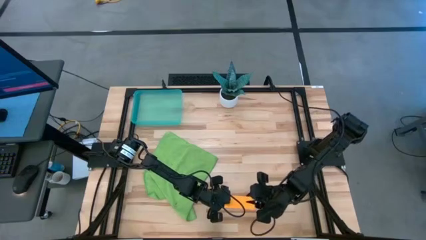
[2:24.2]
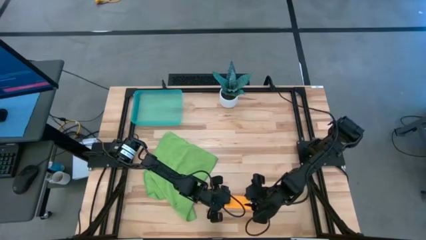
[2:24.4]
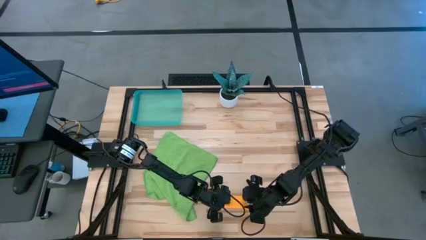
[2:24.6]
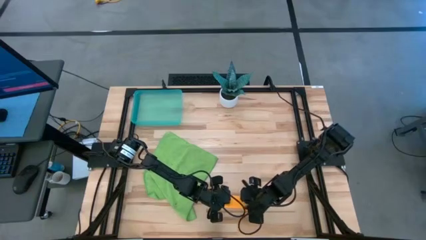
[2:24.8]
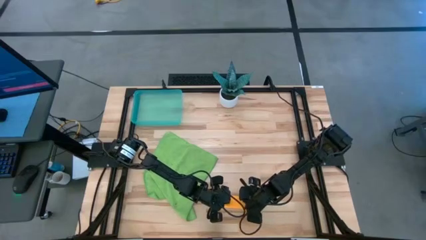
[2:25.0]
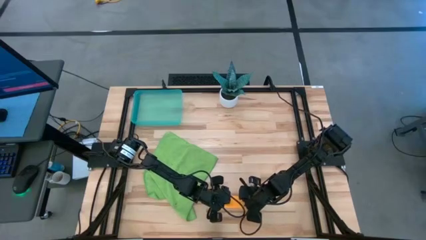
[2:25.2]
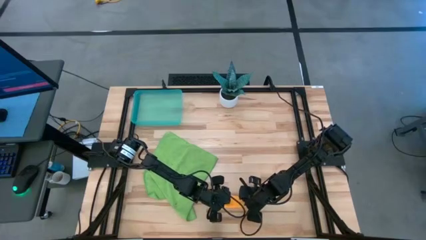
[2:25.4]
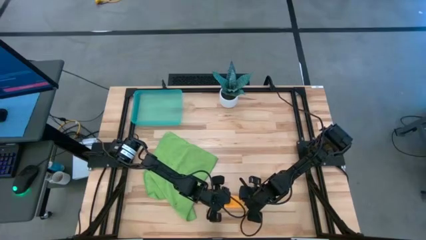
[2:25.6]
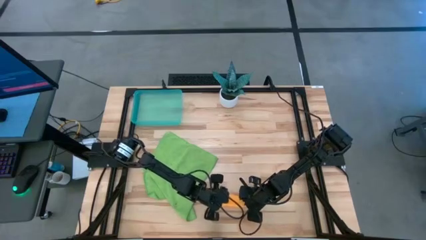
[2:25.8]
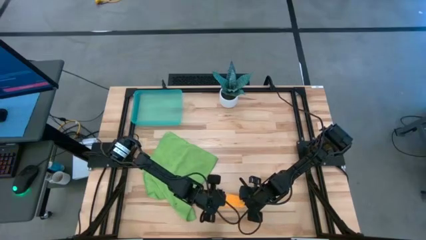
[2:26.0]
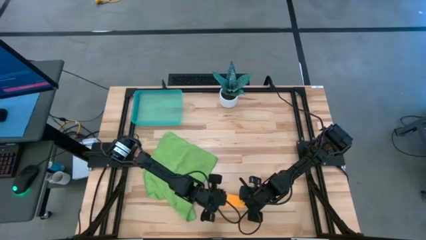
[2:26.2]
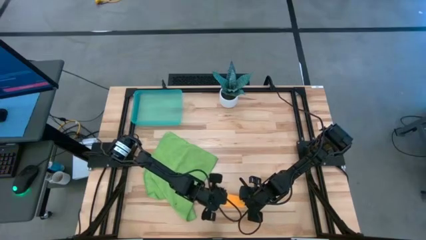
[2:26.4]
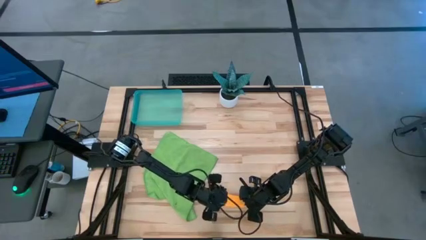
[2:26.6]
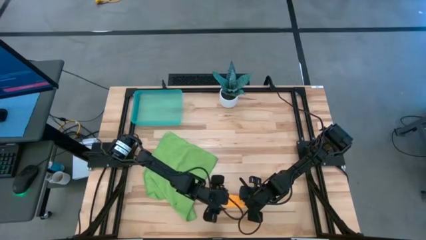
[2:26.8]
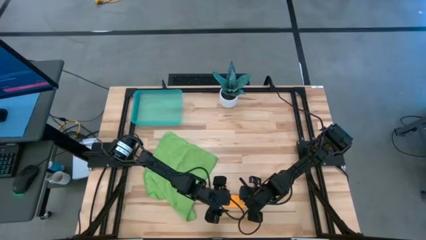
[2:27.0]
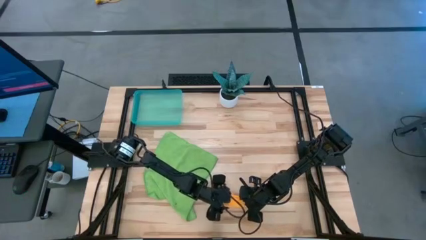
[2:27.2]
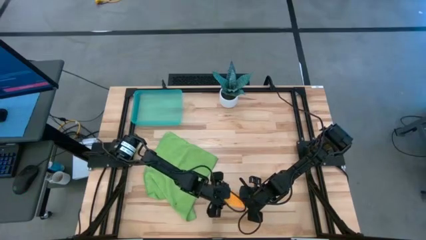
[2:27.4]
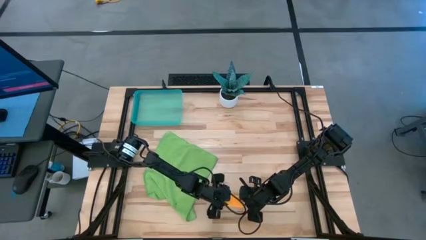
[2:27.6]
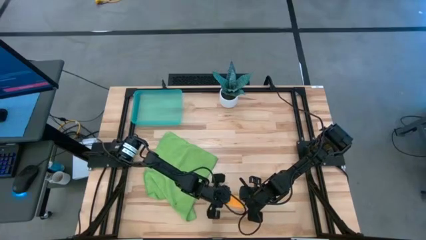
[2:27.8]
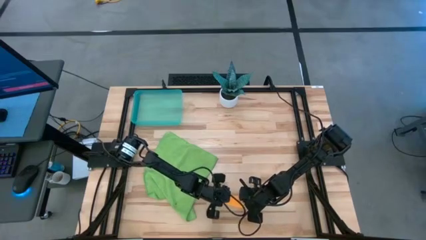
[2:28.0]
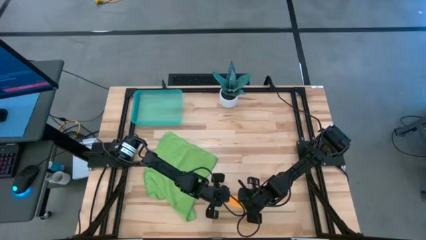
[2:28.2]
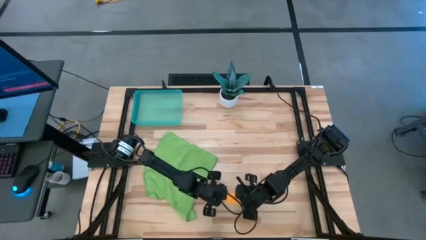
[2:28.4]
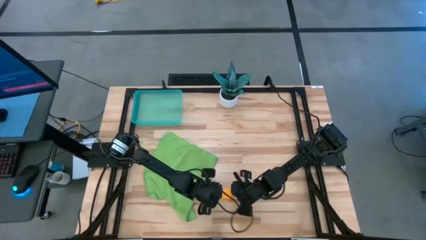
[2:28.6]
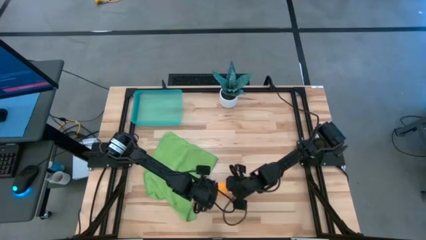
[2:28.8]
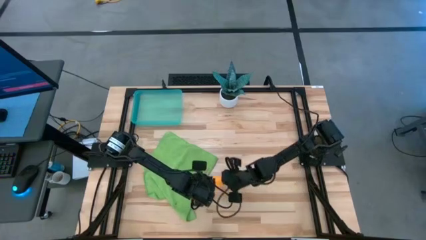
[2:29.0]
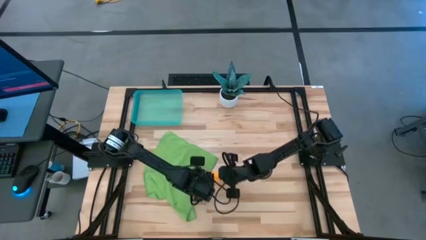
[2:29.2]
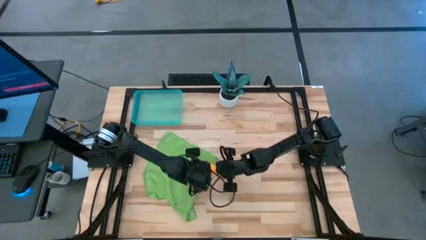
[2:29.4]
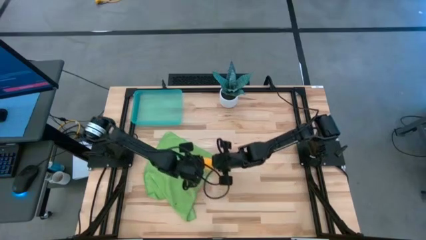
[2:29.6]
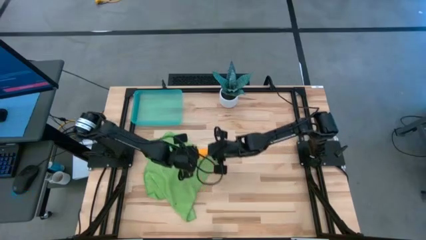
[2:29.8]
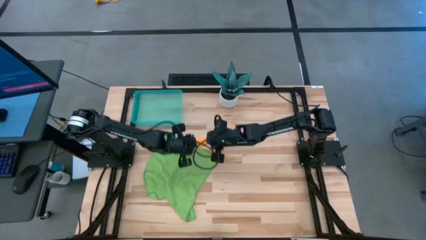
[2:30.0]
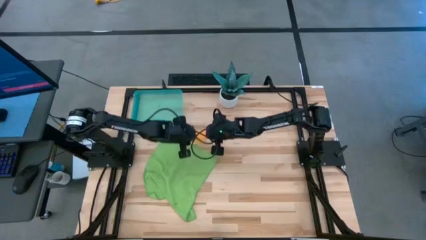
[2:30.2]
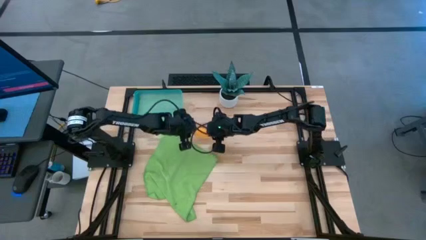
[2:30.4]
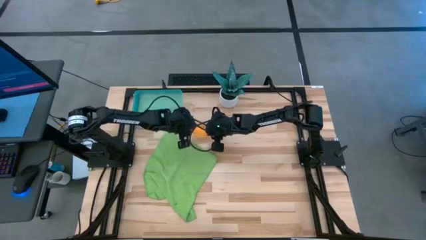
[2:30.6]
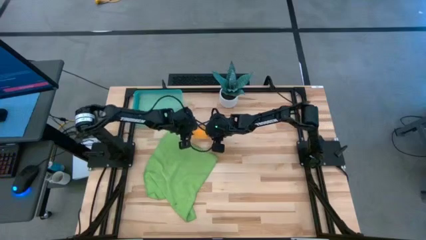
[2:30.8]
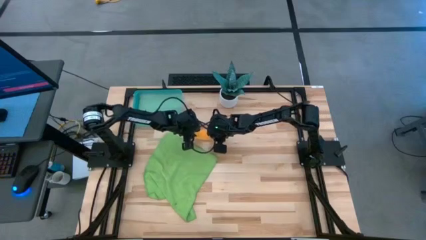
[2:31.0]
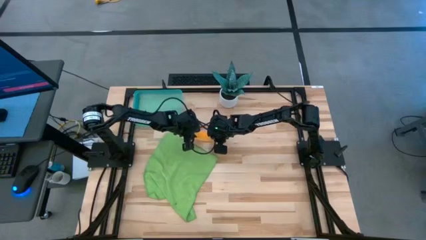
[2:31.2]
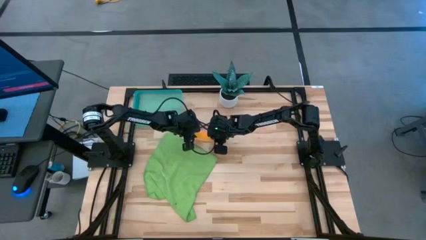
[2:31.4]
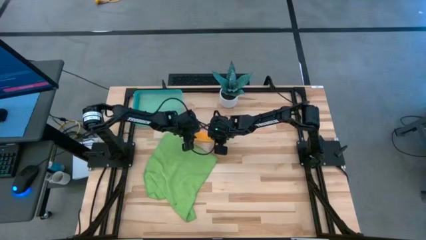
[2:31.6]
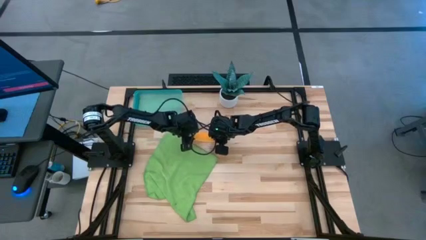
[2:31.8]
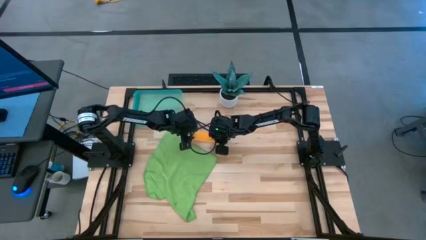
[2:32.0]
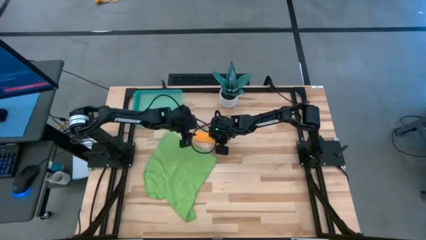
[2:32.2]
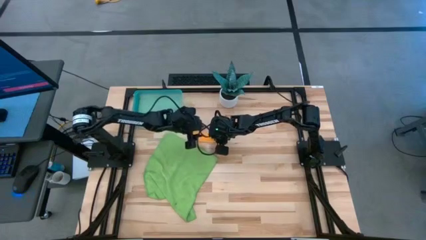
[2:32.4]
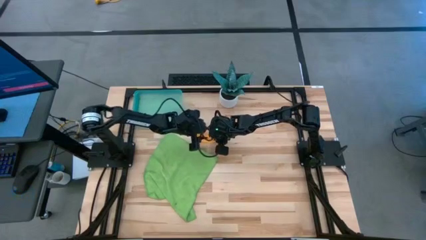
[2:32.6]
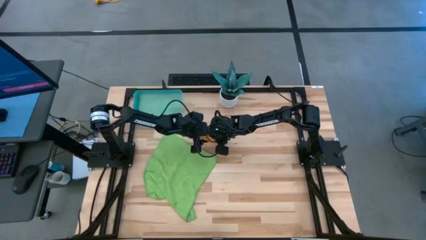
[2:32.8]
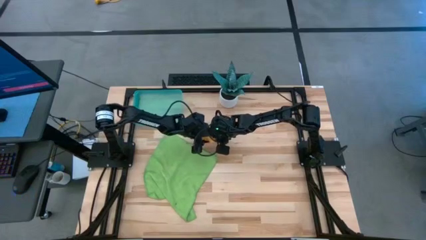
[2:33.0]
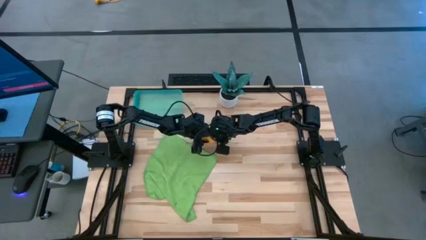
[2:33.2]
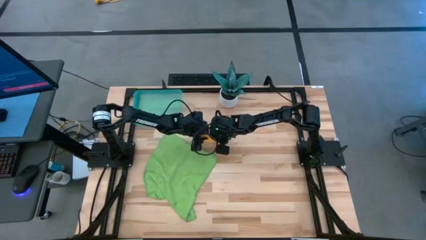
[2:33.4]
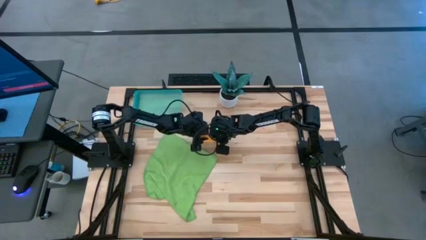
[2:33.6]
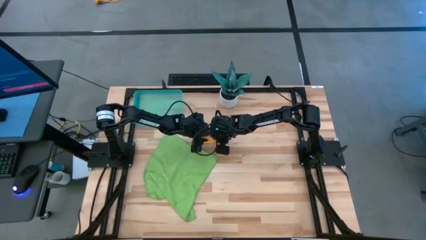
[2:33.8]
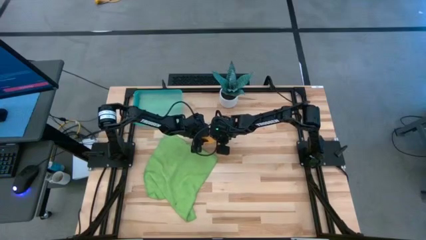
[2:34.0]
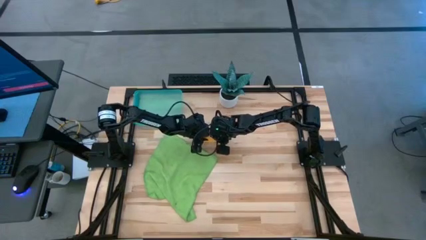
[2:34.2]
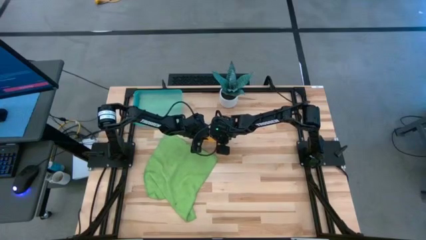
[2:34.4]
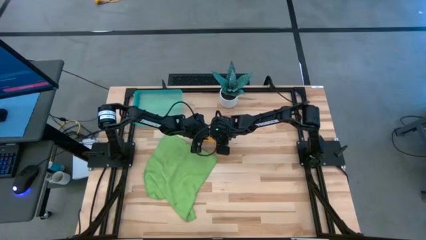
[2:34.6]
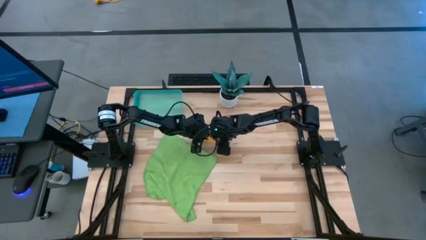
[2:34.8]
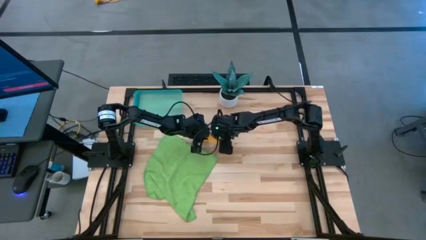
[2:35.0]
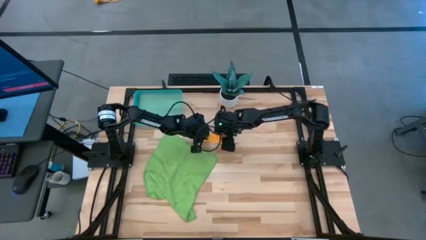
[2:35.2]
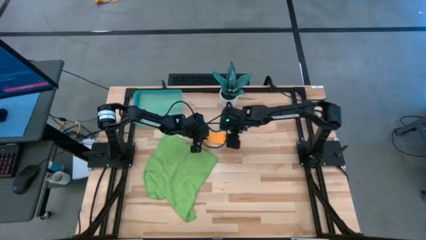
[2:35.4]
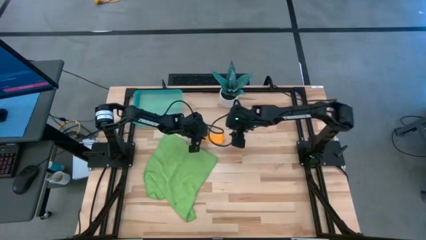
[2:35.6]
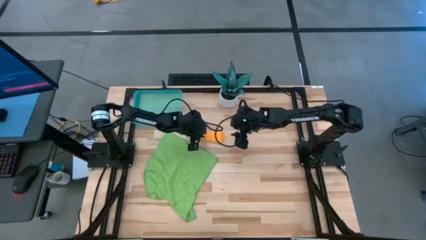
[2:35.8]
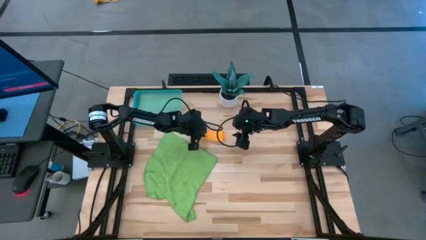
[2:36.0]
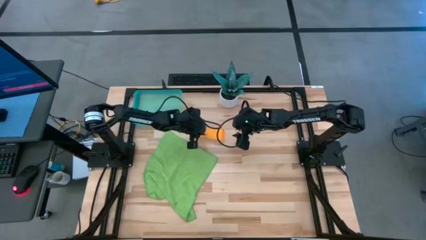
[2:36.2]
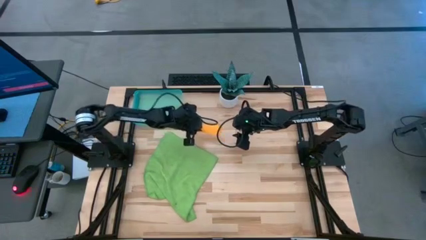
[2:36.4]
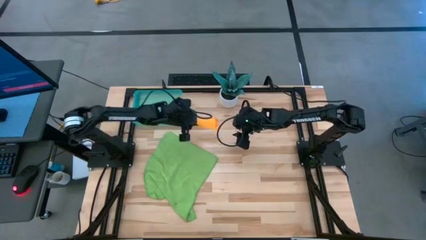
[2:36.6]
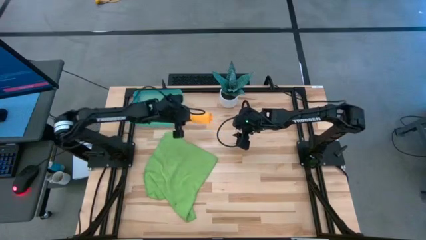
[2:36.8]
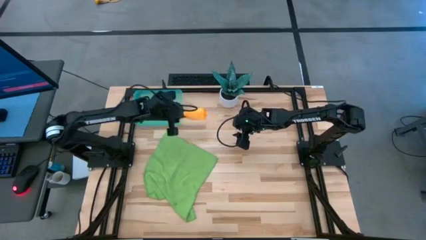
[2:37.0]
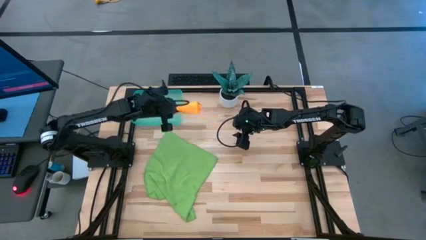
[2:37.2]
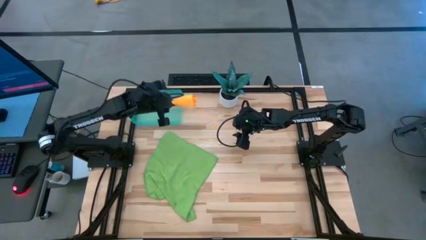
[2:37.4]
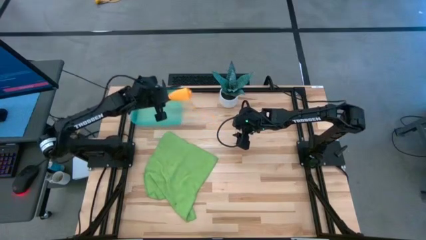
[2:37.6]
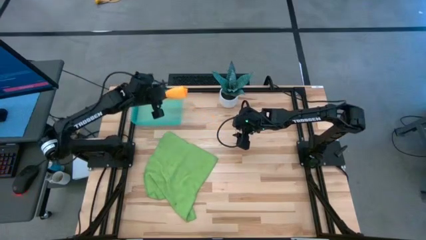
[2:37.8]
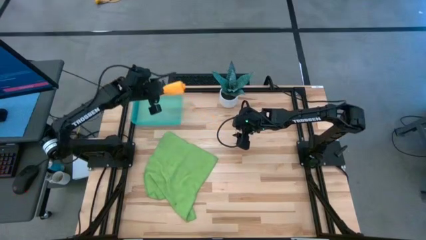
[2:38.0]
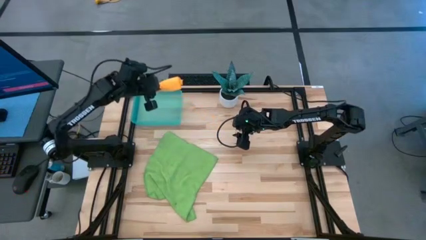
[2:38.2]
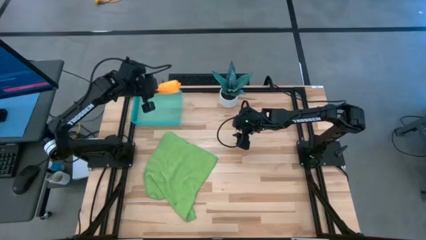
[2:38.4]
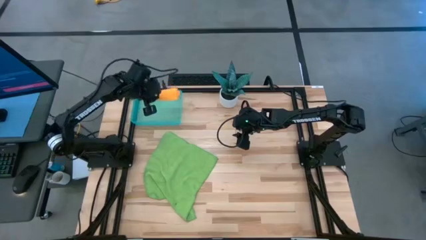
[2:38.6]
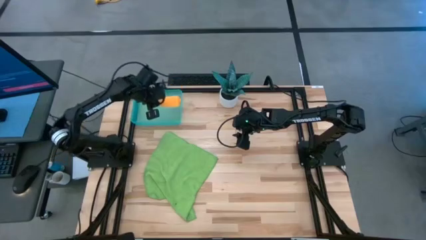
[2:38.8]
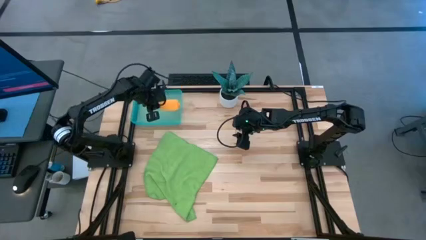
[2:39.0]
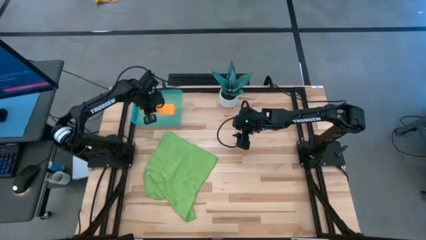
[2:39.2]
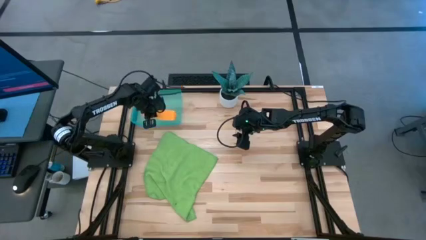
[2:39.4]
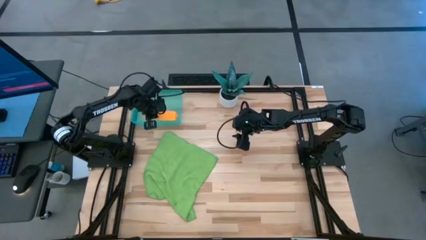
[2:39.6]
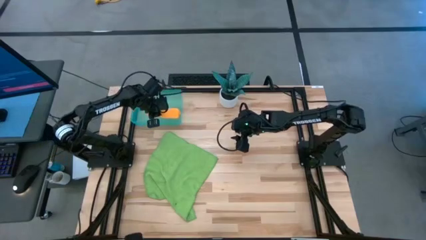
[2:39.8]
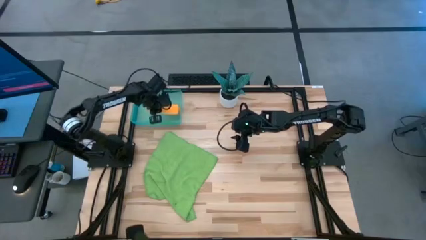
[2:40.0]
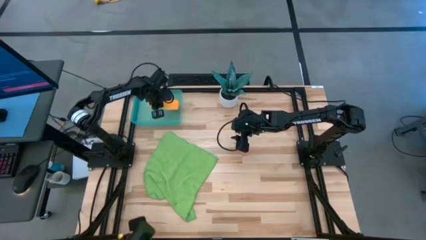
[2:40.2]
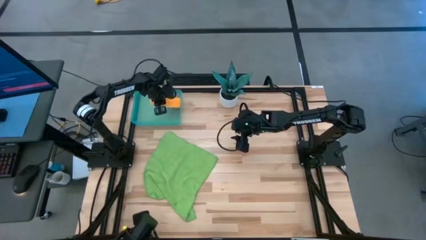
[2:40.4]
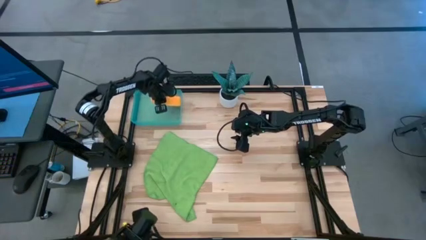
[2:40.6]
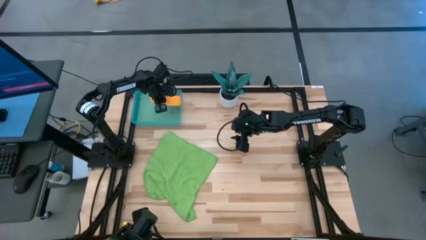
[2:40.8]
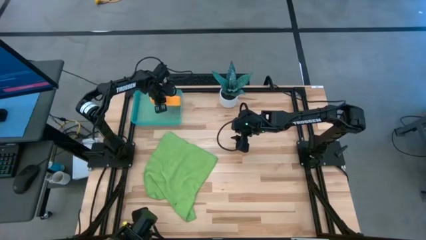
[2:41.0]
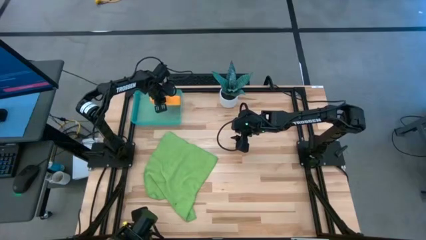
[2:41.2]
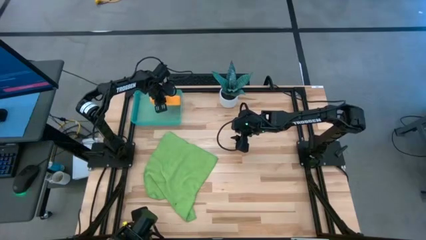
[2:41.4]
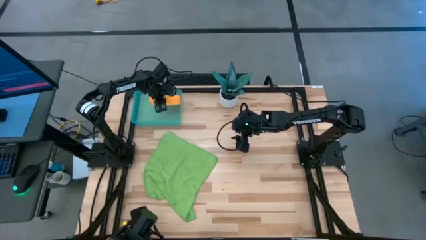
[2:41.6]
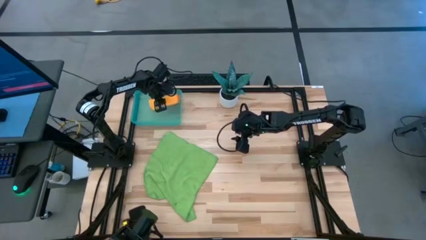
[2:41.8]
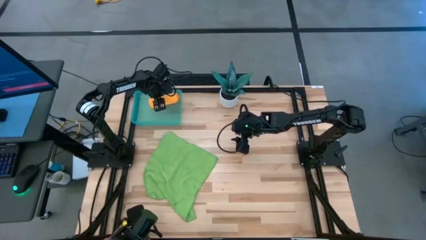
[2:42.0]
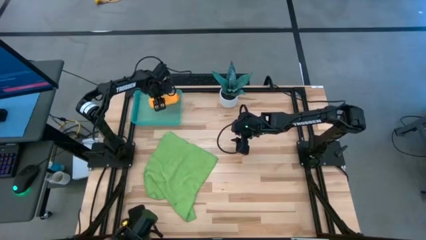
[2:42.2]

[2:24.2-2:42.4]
Task: Roll microfiber towels into tight, uniform cylinder then place into a basket
Put the yellow microfiber cloth into the transparent light green bin
